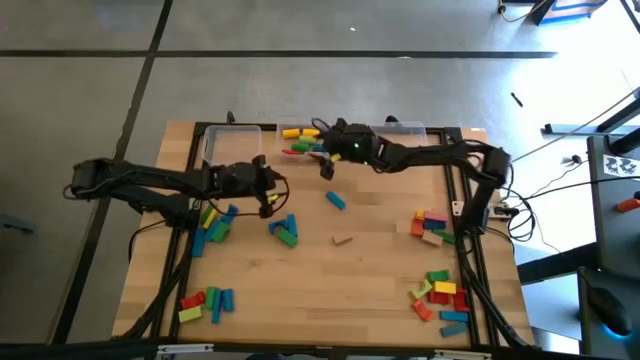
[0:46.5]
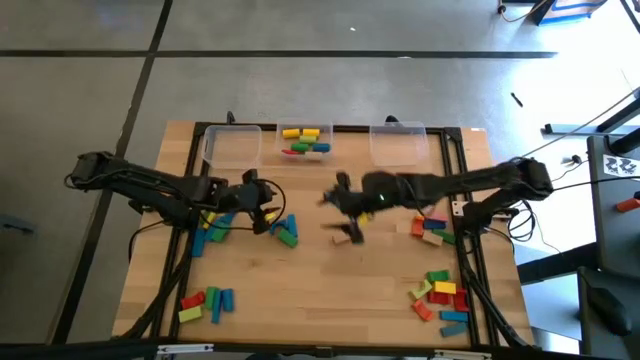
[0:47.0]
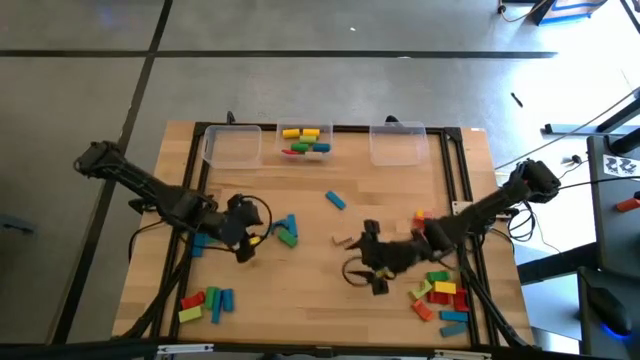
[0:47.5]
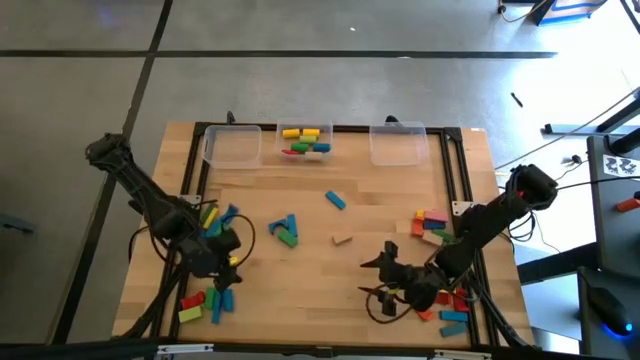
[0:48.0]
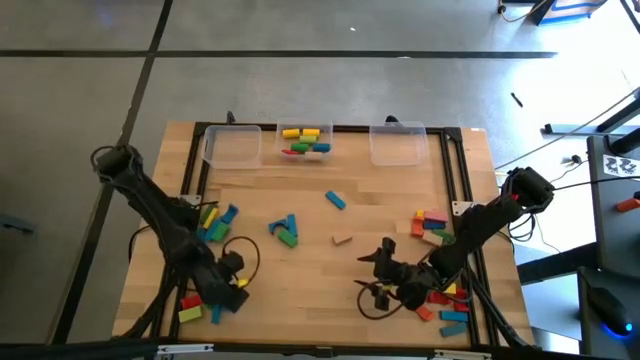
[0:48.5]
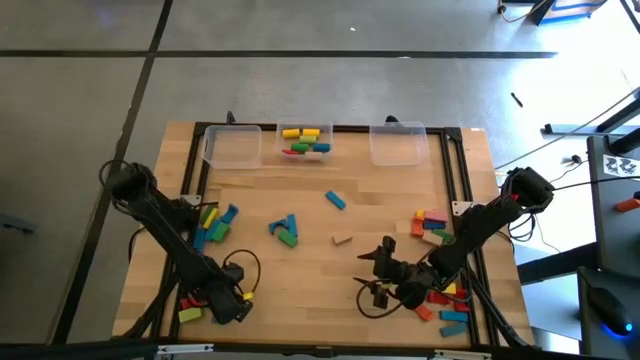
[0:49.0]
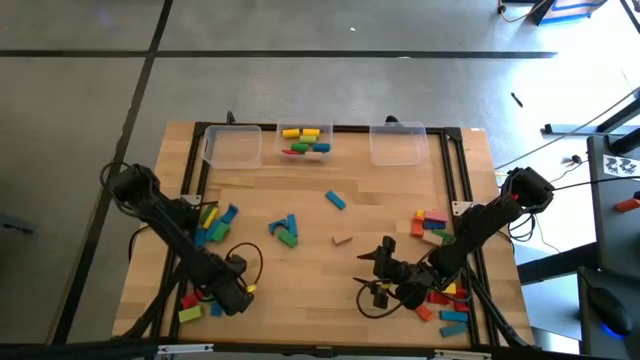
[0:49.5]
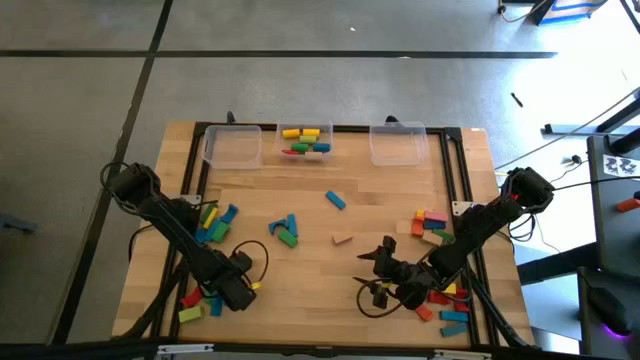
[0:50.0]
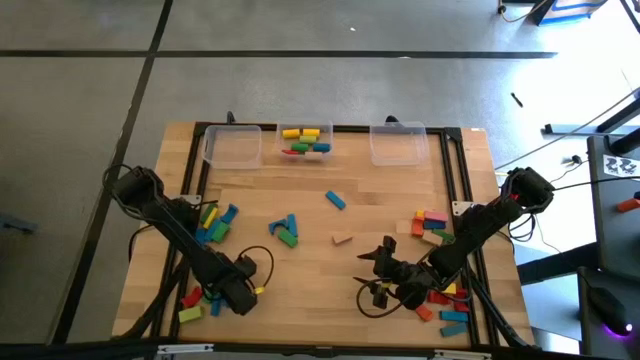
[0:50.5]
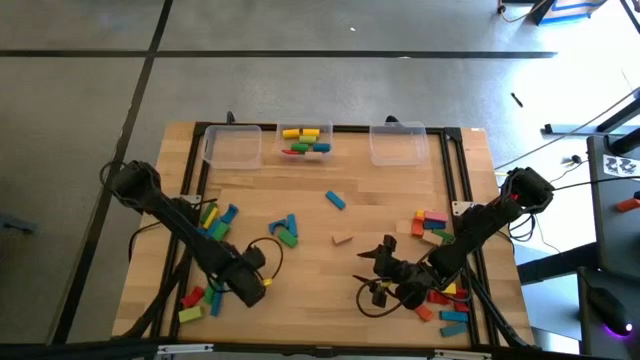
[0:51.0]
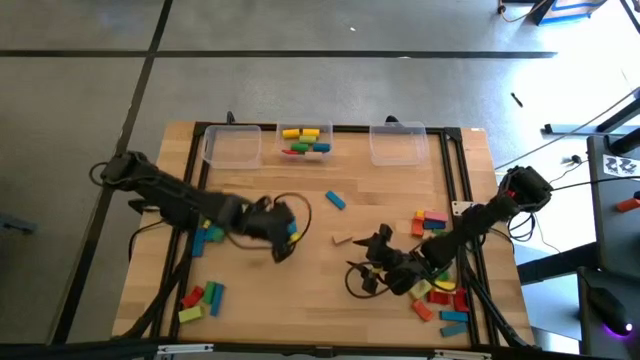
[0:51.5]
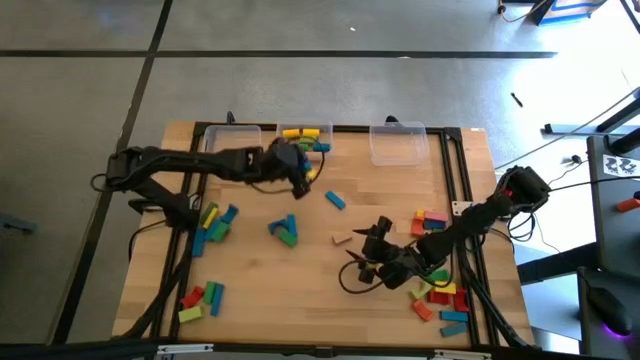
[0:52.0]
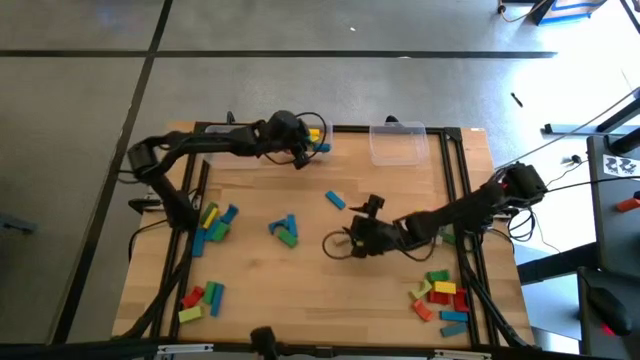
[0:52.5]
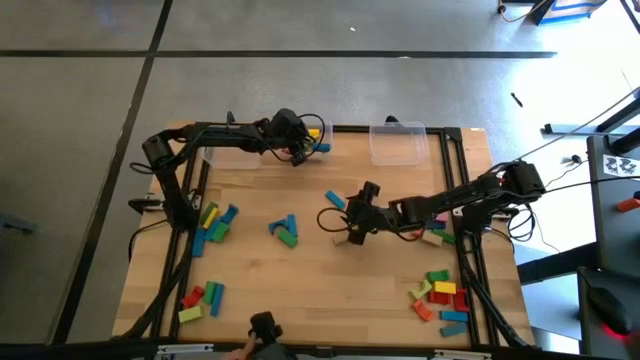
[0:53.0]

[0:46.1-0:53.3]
Task: Sort blocks by size
Put the blue cylindrical block into the middle transparent bin

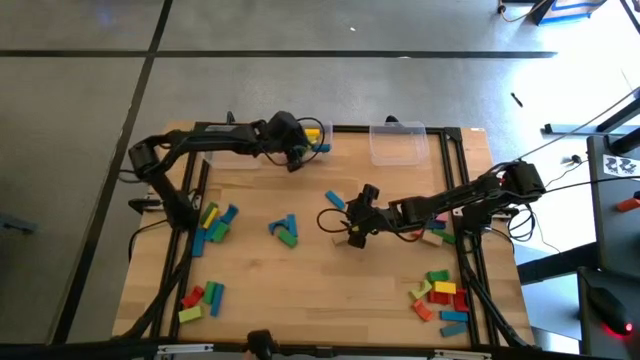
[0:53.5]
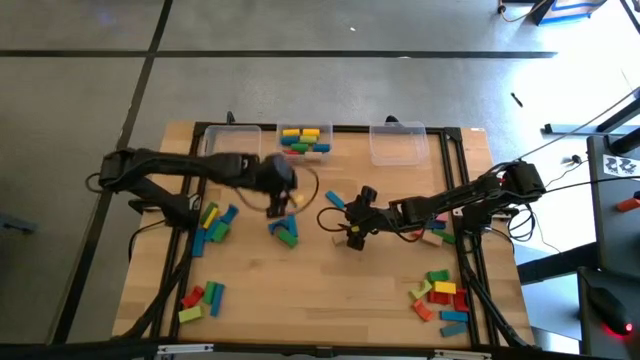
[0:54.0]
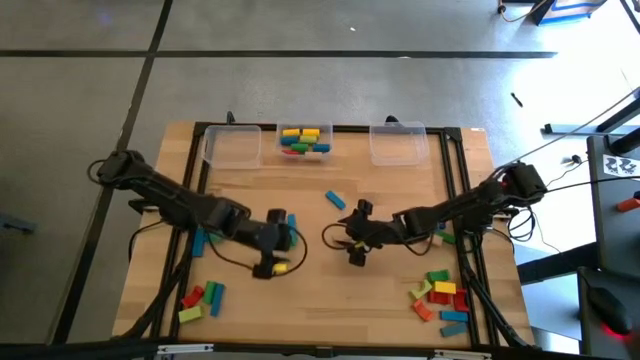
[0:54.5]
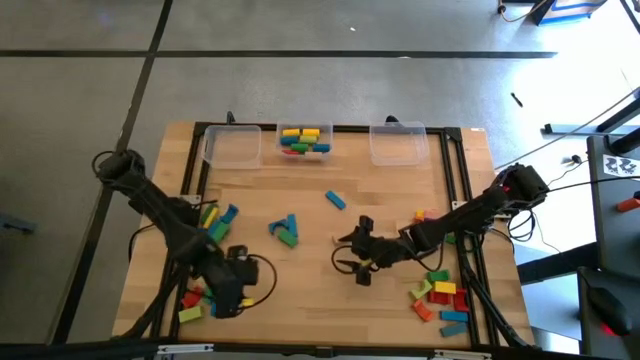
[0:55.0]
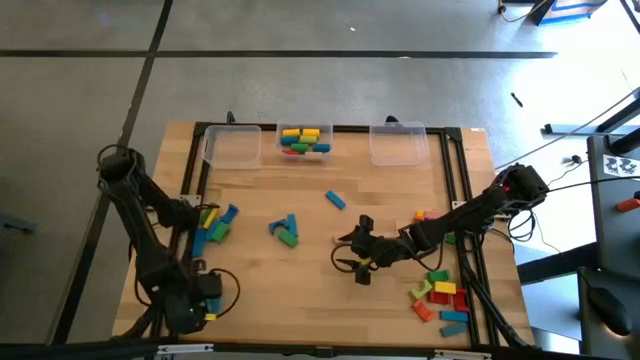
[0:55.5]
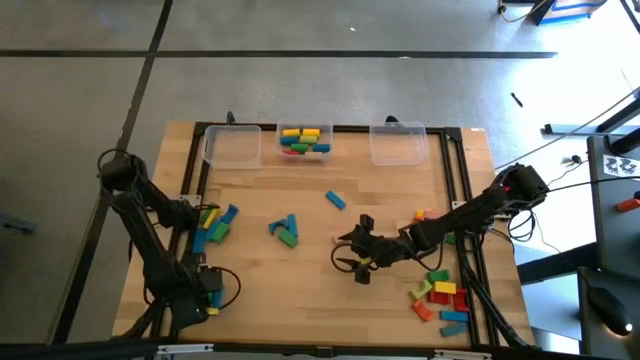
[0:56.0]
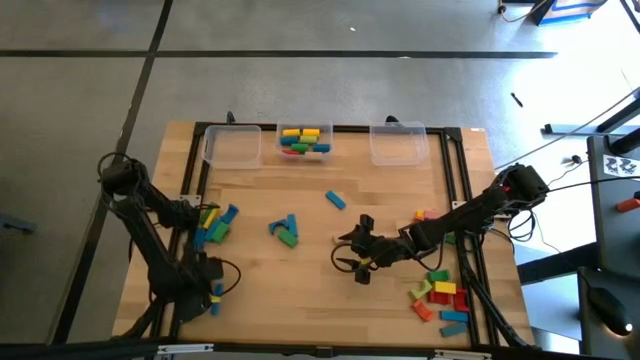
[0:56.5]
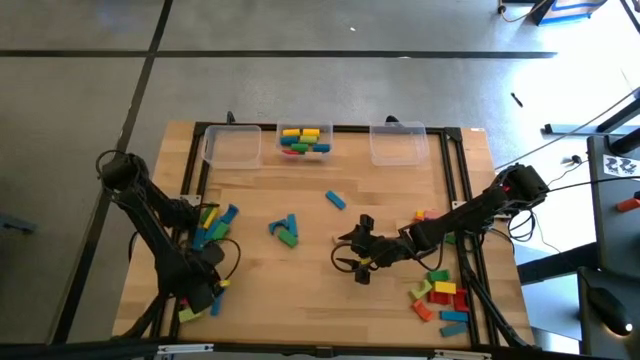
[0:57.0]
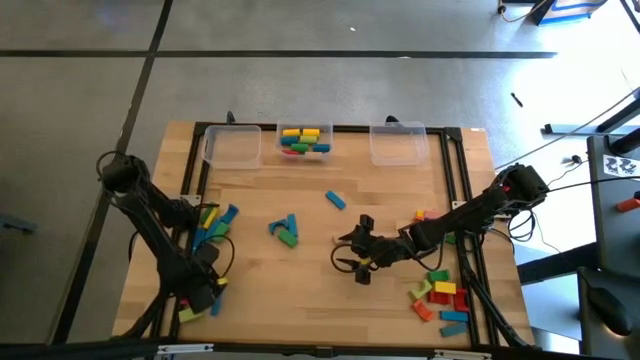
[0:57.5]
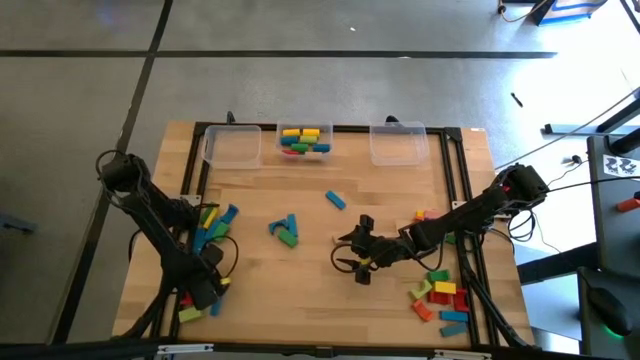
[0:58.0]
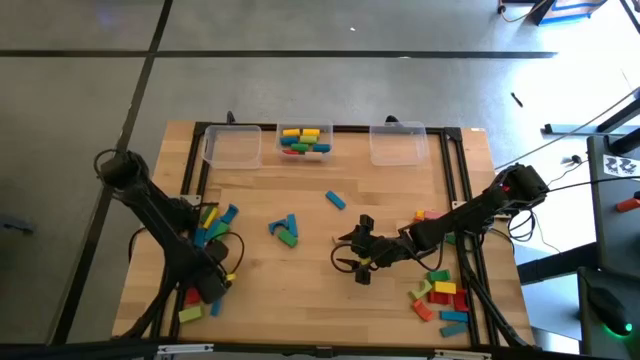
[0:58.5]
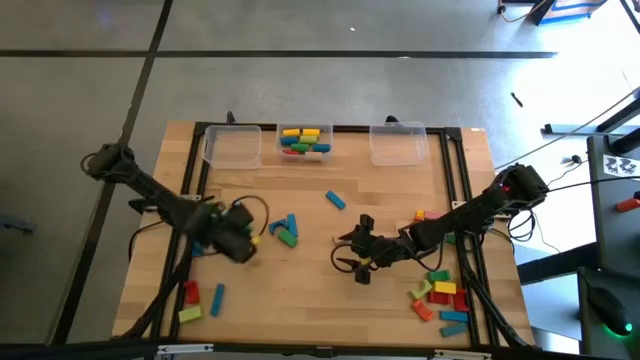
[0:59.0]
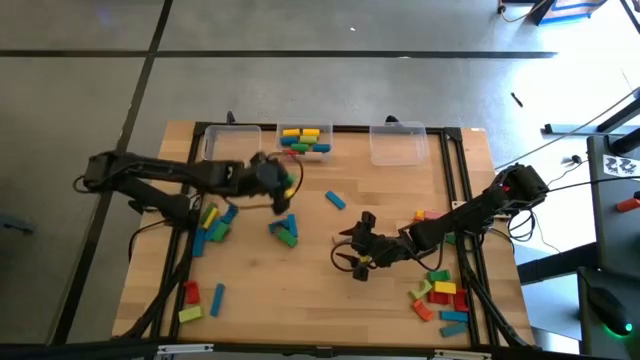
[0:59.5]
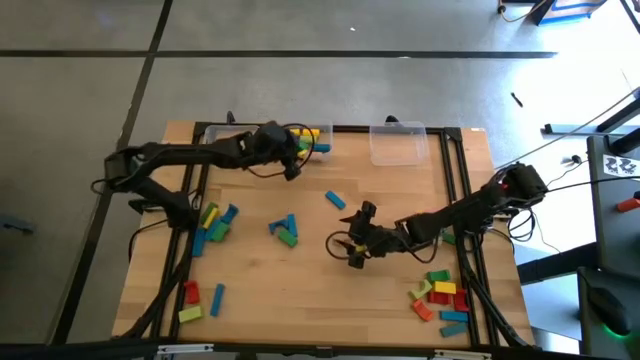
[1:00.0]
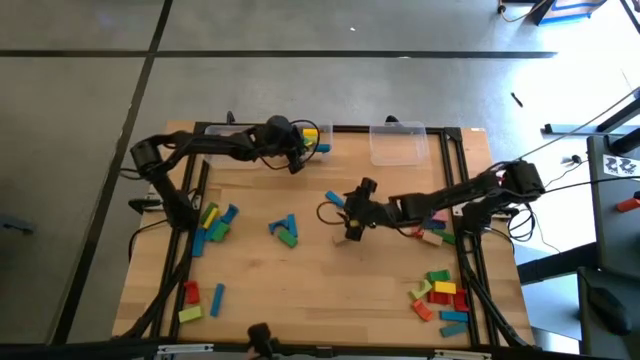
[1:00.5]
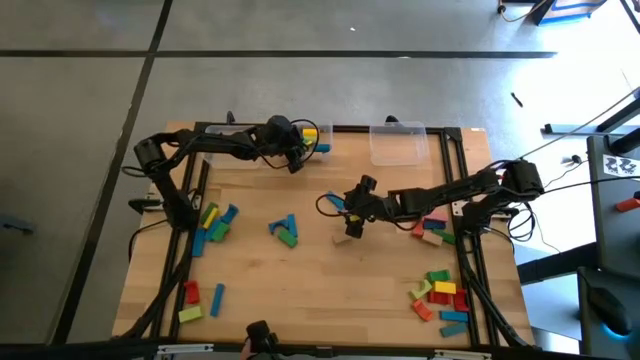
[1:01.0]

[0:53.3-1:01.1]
Put the green cylindrical block into the middle transparent bin

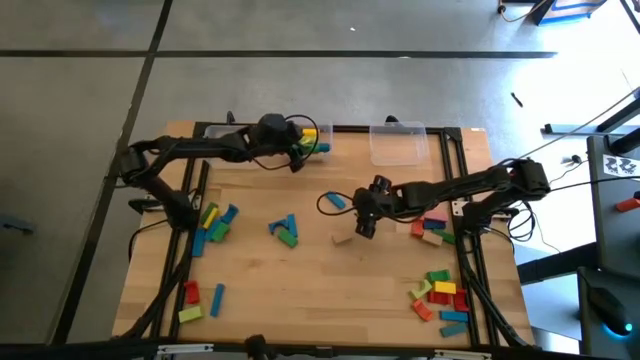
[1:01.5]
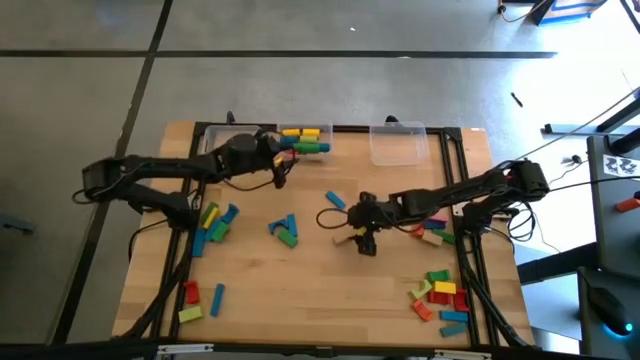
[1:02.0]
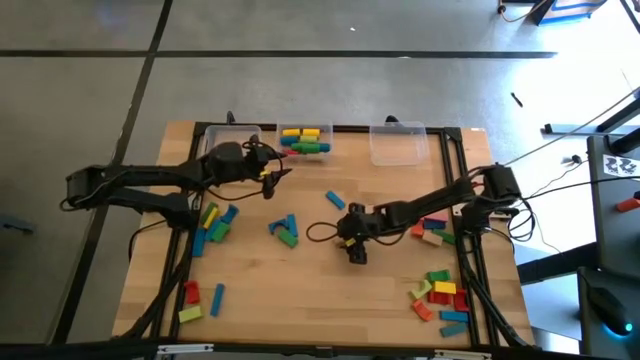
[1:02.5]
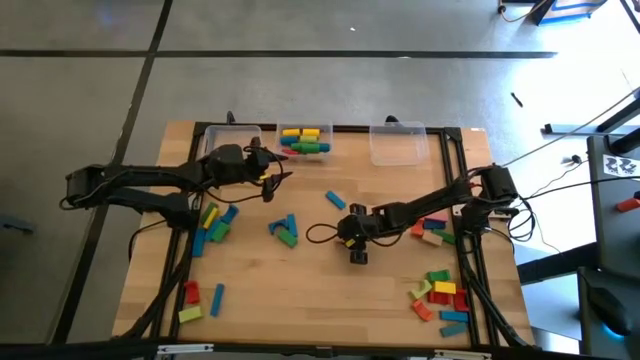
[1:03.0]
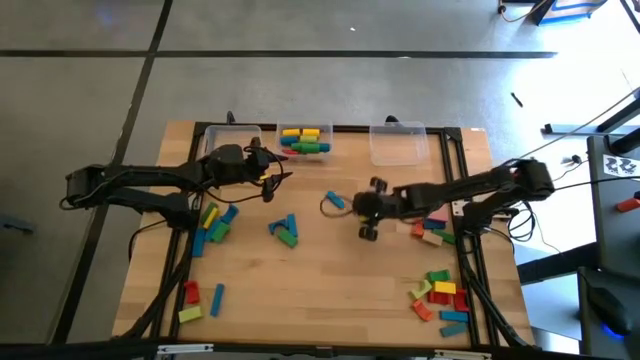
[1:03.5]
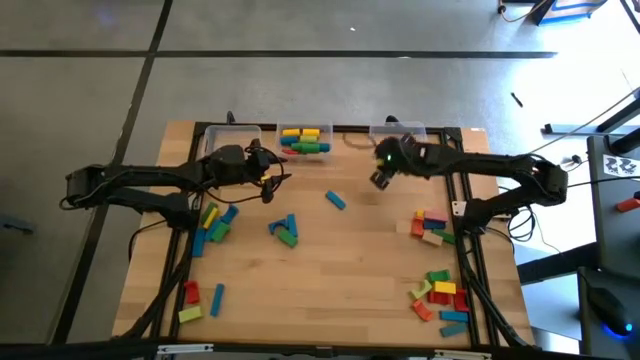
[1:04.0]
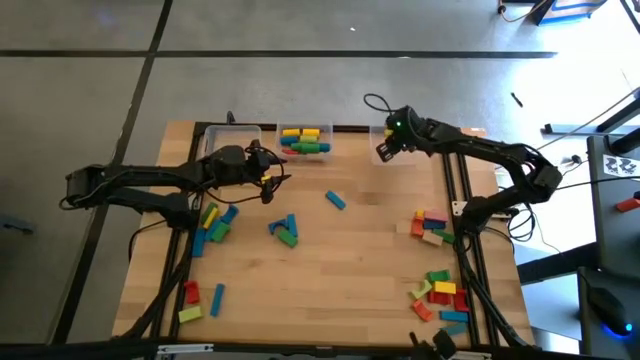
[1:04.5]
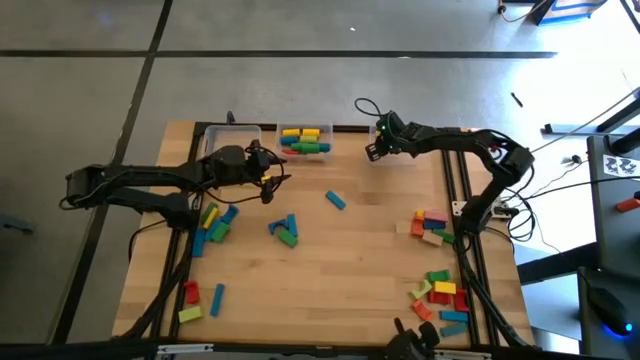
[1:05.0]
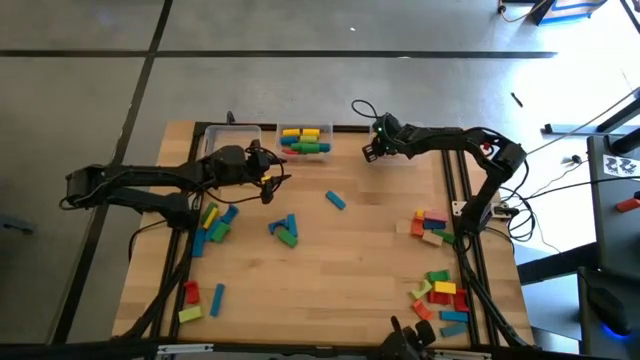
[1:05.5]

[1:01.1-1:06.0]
Put the brown rectangular block into the right transparent bin

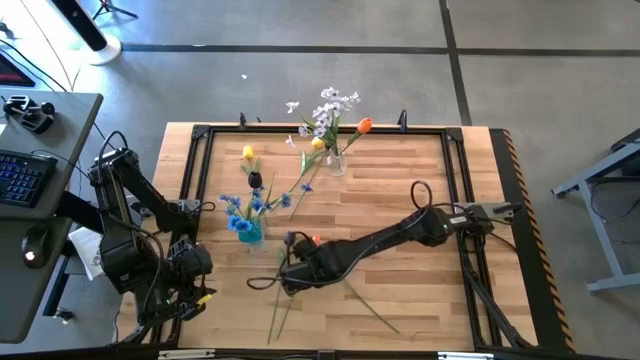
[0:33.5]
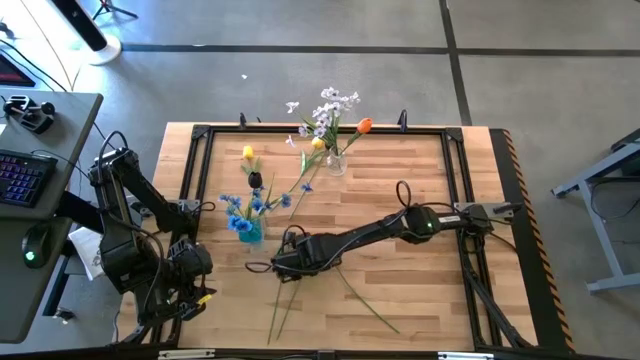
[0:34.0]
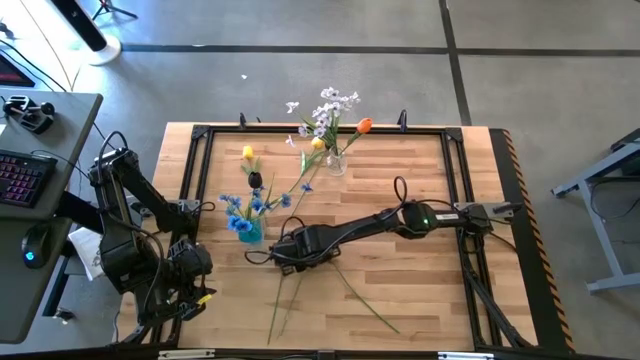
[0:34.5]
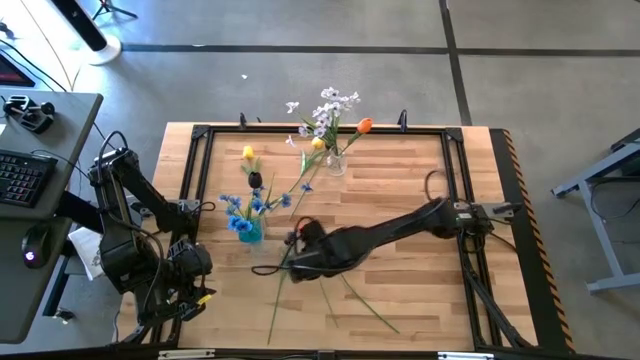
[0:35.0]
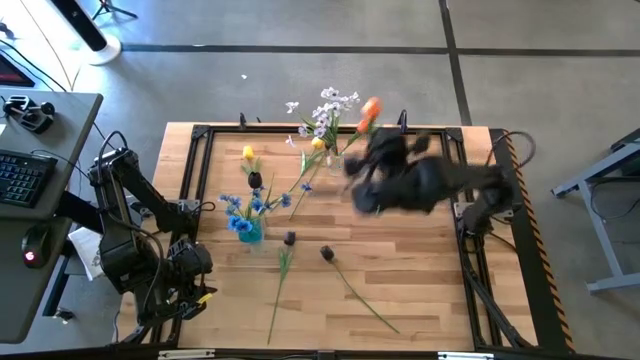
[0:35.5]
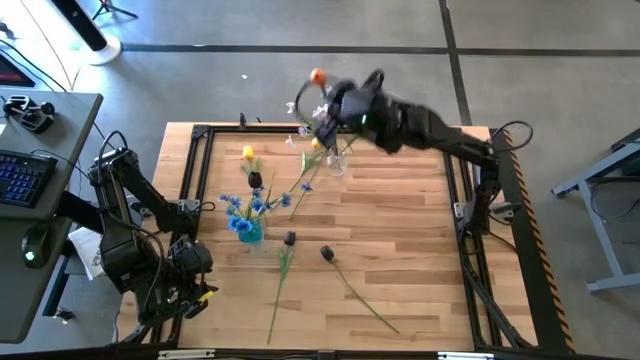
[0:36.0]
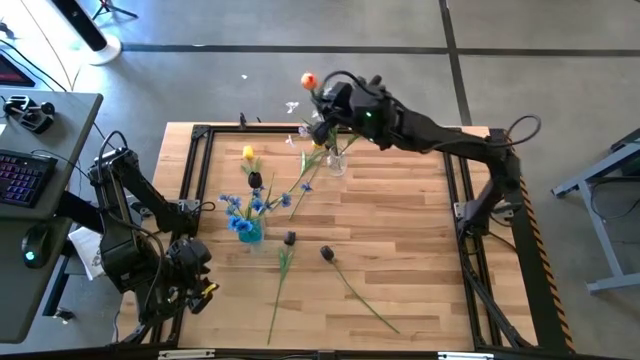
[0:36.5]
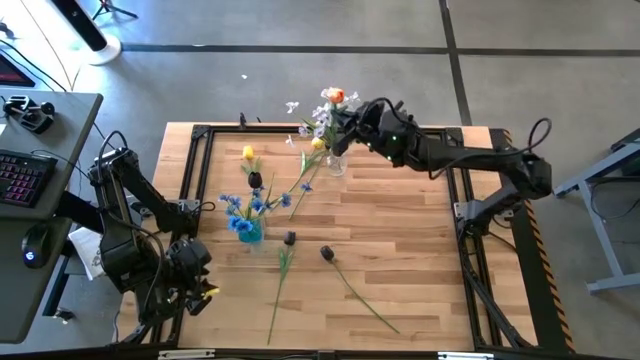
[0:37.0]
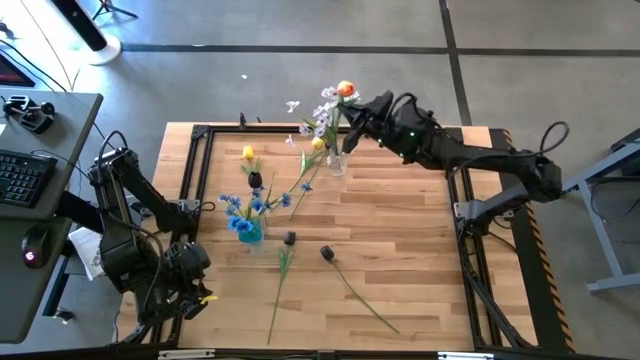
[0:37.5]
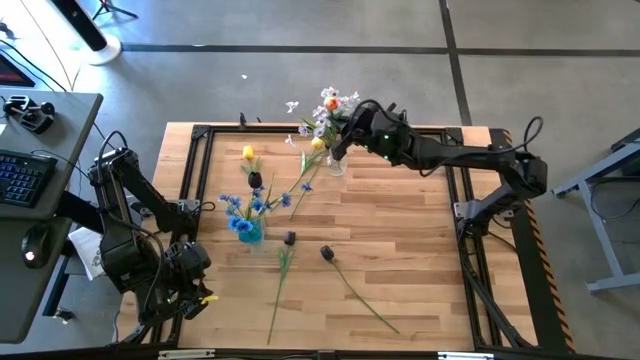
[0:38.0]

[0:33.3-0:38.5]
Task: Sort flowers into vase by color
Put the orange flower into the transparent vase
